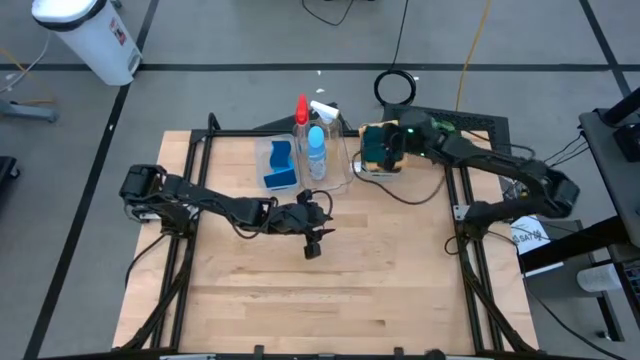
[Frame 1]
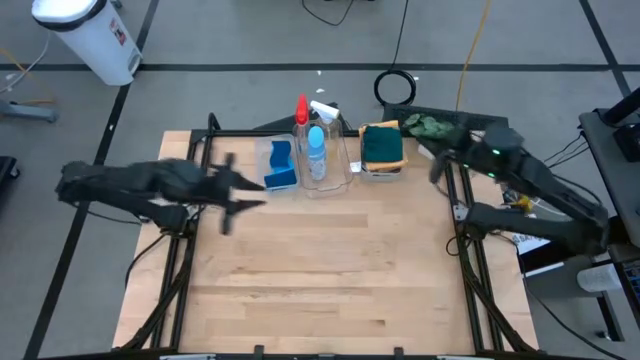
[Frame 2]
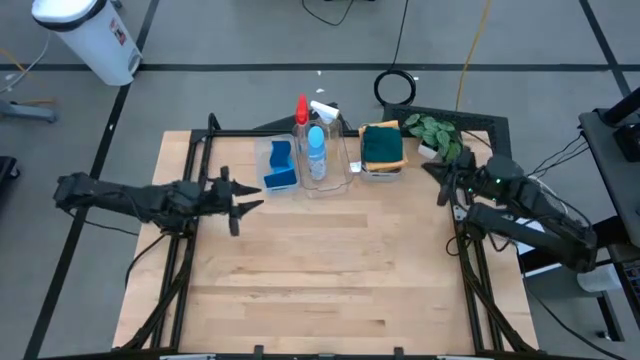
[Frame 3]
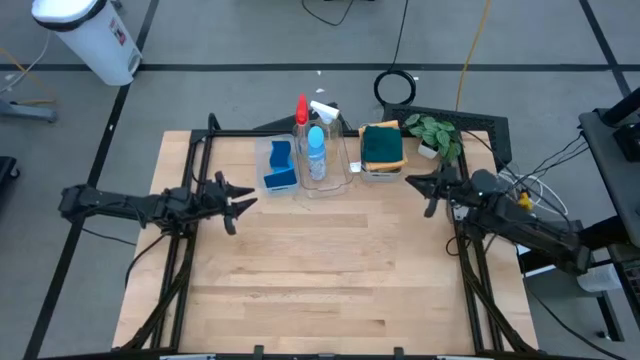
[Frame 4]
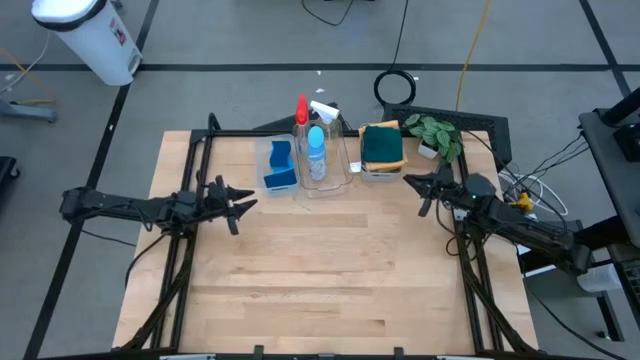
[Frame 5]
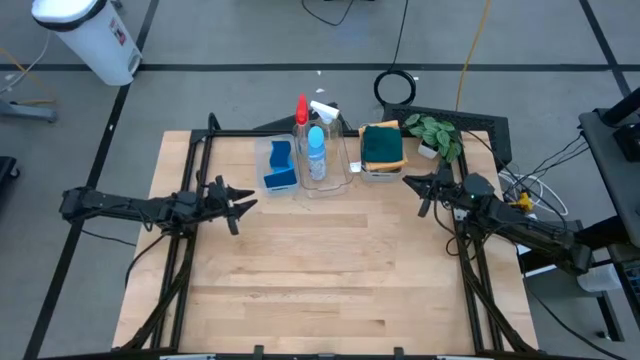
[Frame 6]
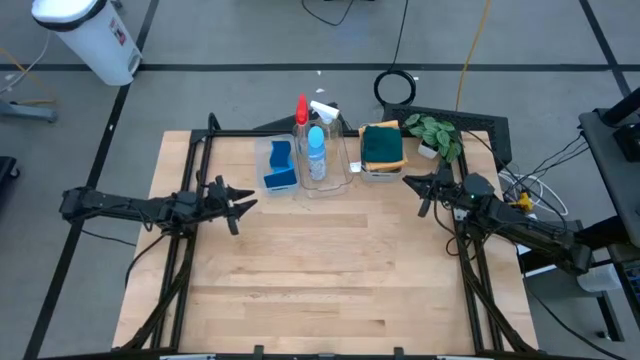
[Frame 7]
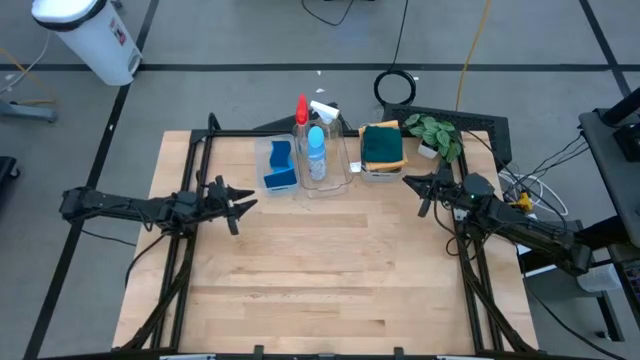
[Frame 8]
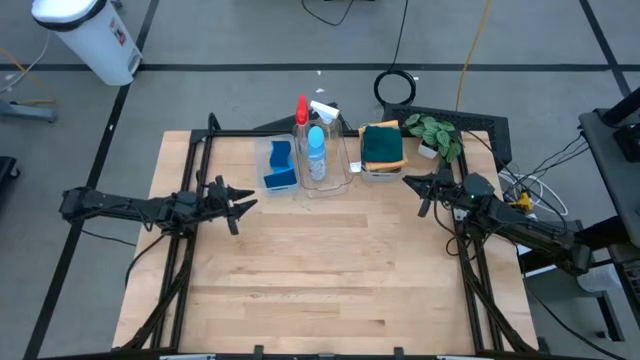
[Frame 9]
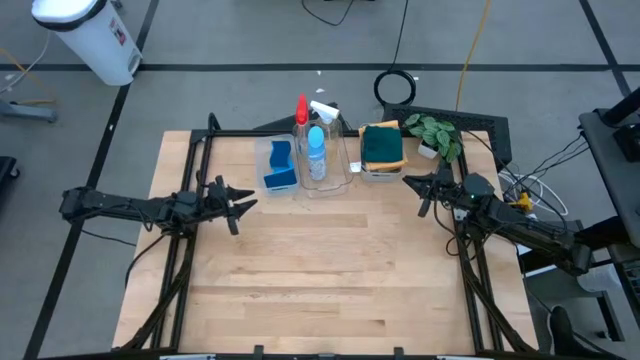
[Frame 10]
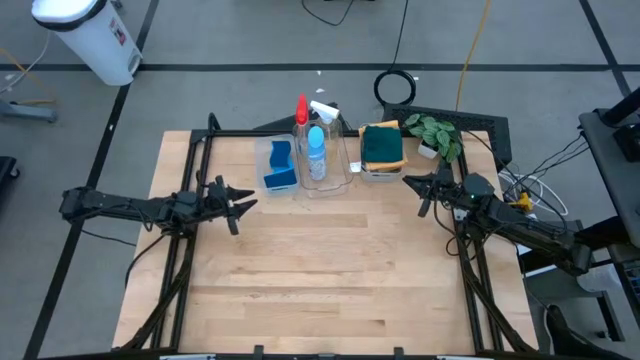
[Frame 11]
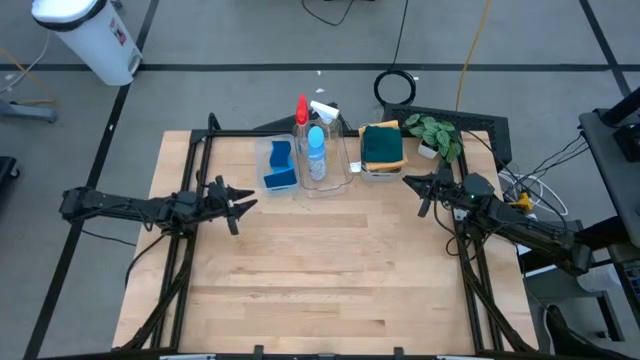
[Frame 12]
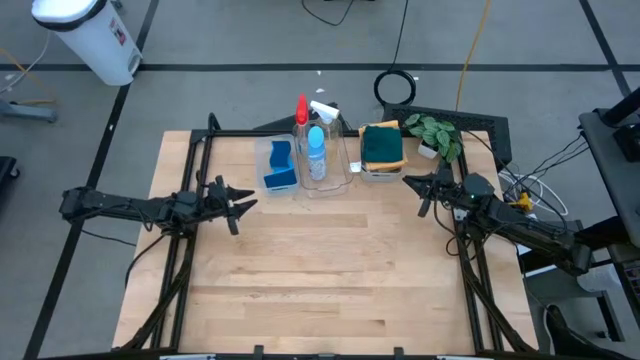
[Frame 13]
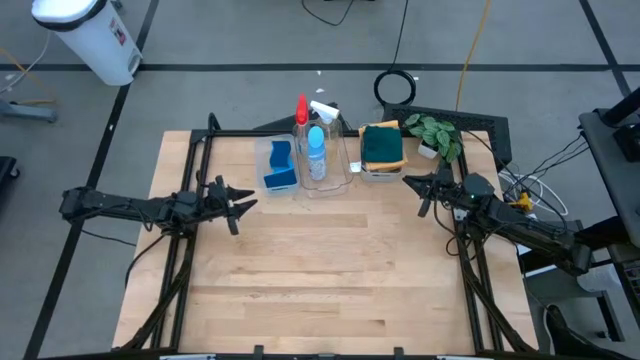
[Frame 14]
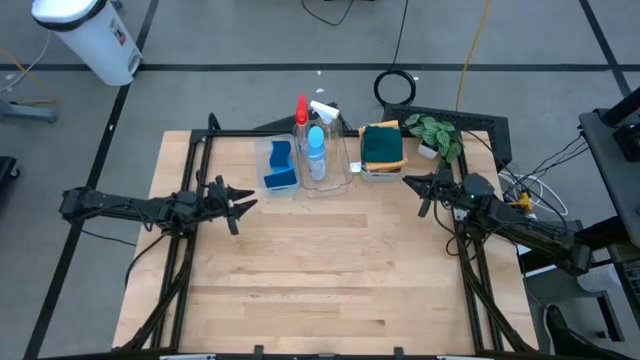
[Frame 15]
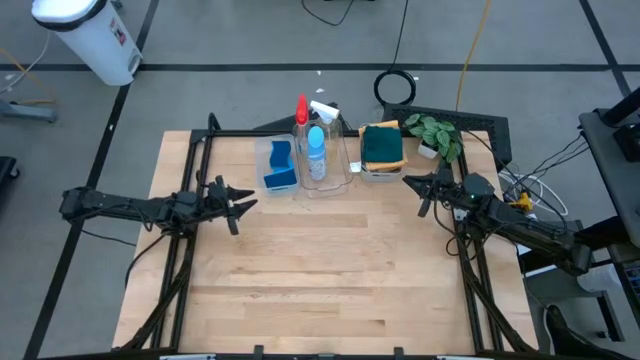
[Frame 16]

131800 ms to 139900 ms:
Task: Pick & Place Kitchen Items
Return to Home Position

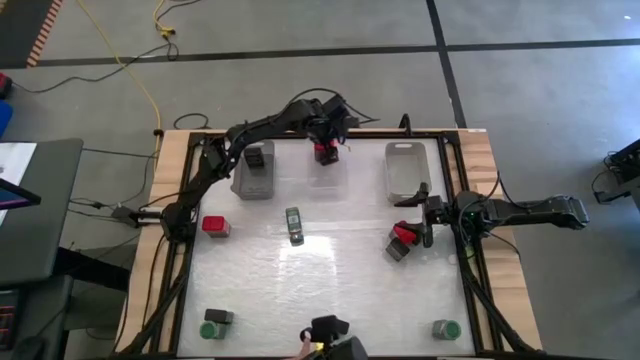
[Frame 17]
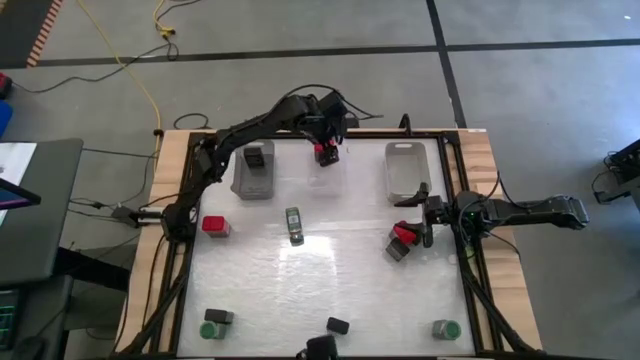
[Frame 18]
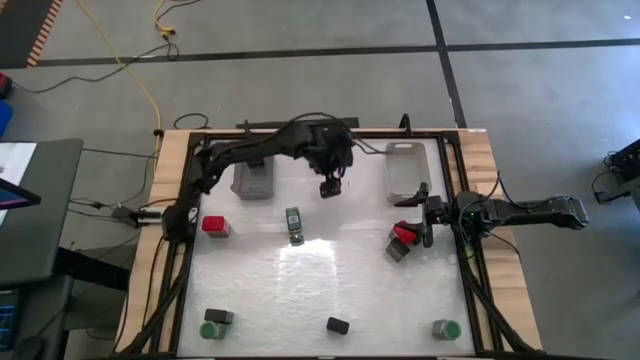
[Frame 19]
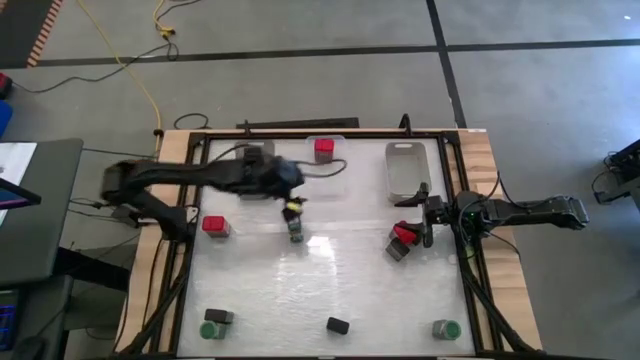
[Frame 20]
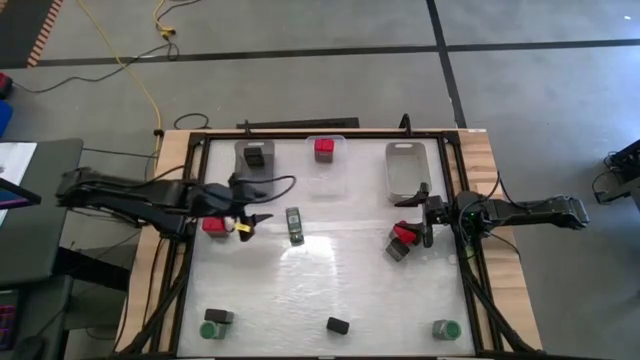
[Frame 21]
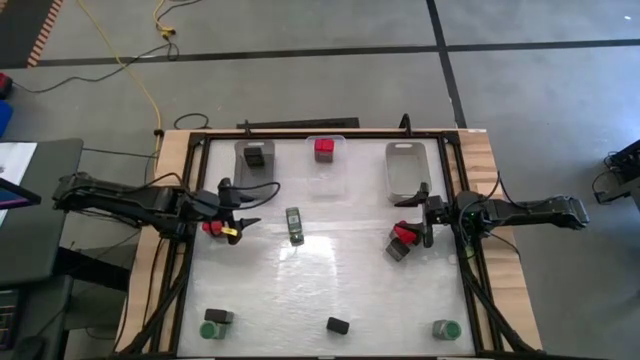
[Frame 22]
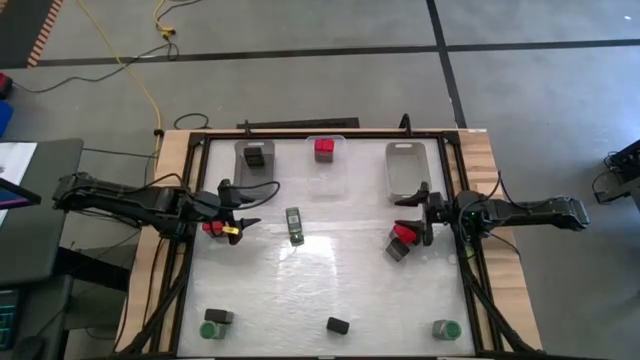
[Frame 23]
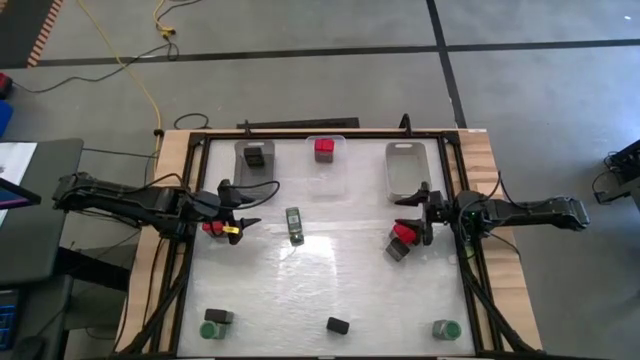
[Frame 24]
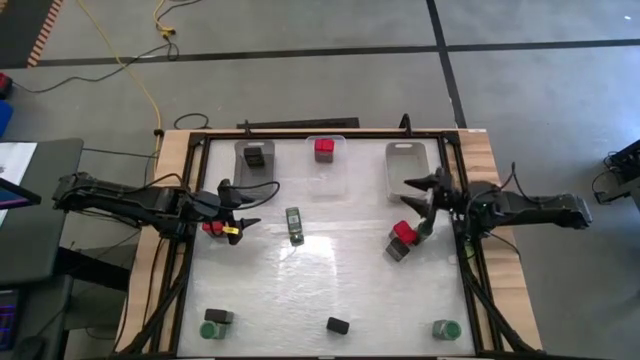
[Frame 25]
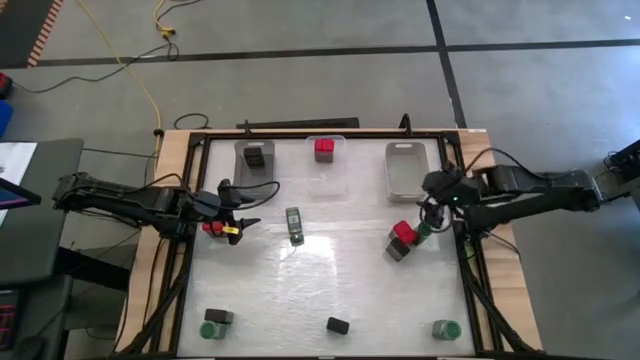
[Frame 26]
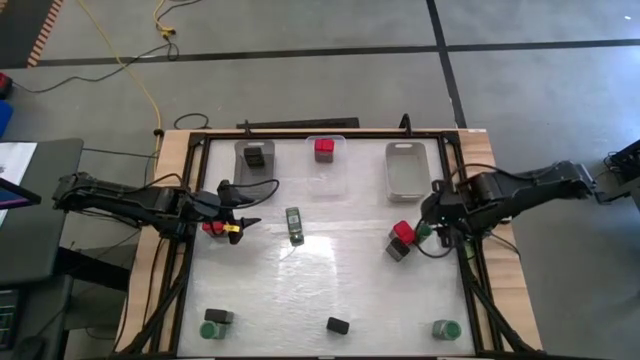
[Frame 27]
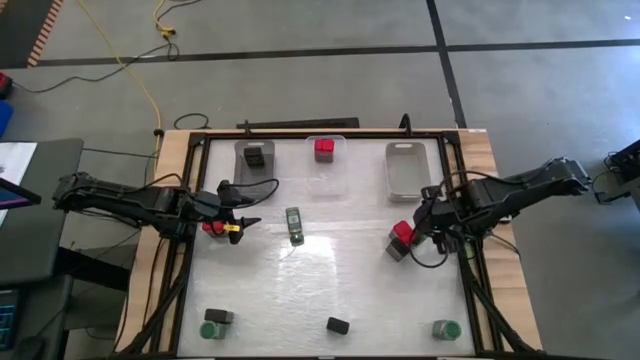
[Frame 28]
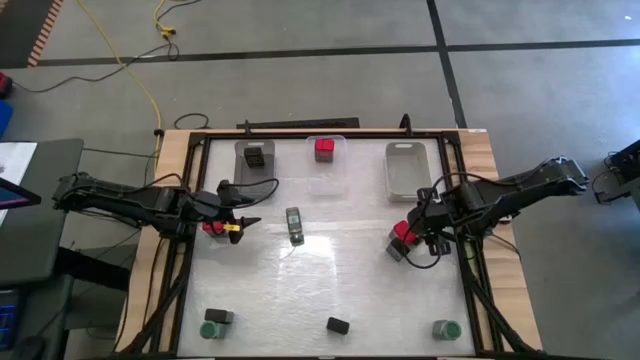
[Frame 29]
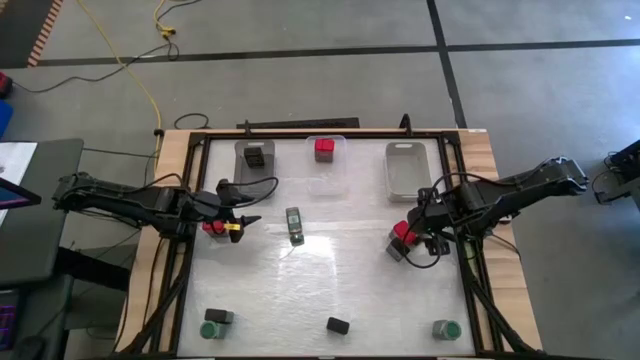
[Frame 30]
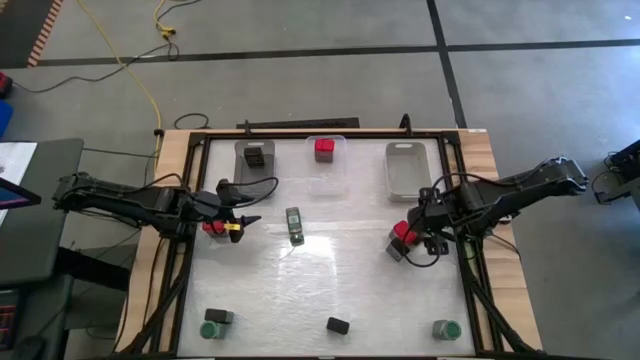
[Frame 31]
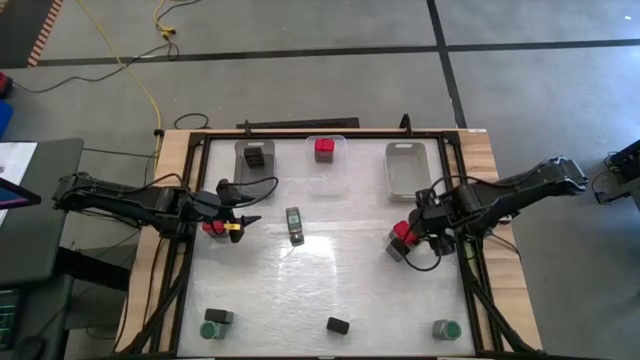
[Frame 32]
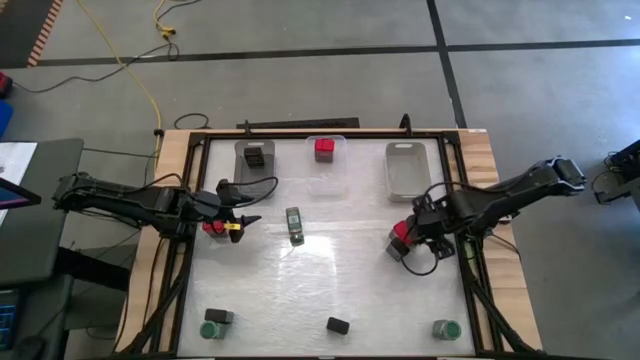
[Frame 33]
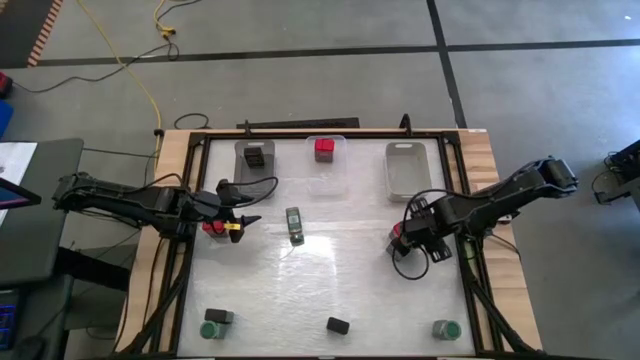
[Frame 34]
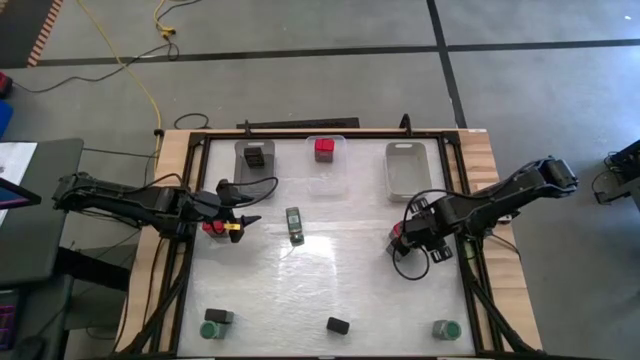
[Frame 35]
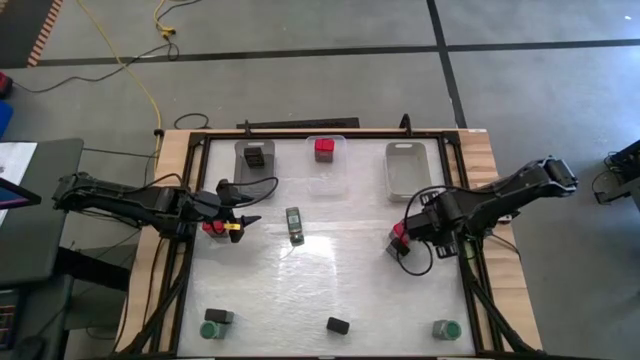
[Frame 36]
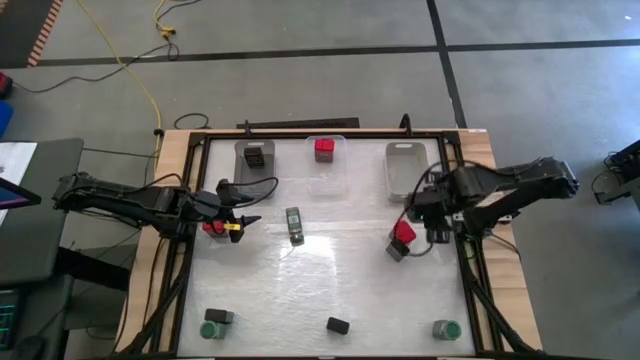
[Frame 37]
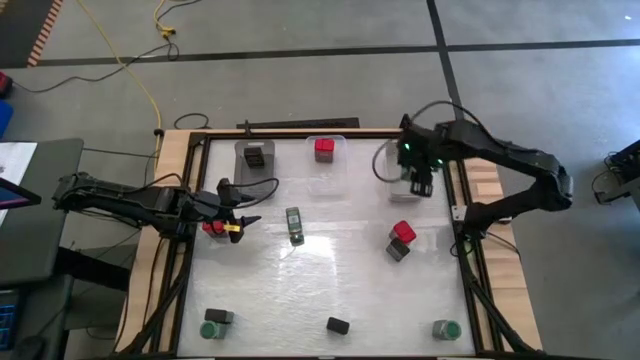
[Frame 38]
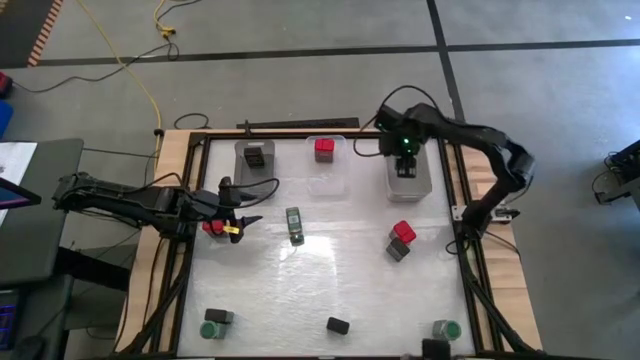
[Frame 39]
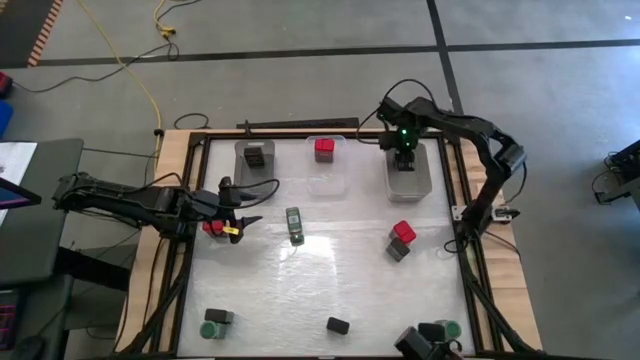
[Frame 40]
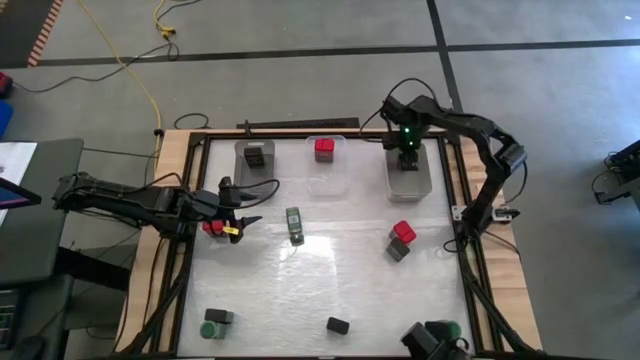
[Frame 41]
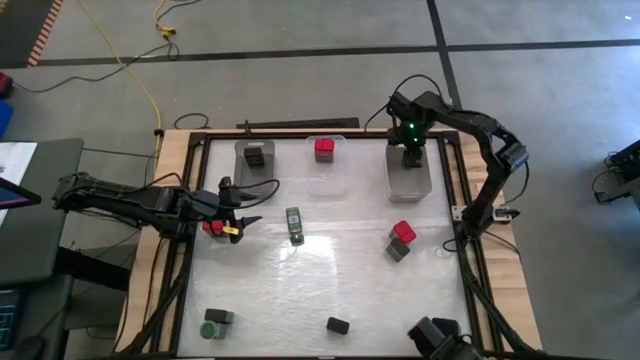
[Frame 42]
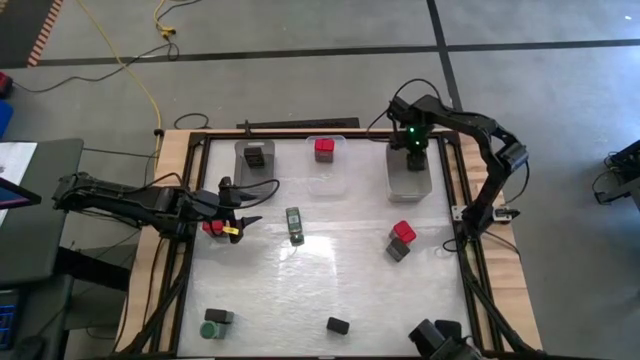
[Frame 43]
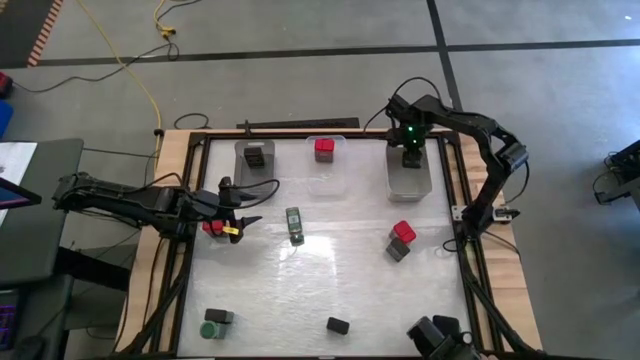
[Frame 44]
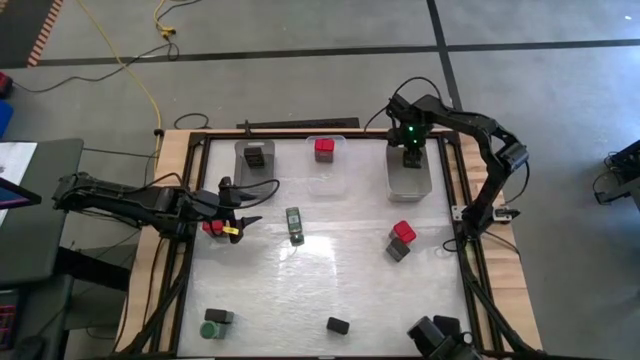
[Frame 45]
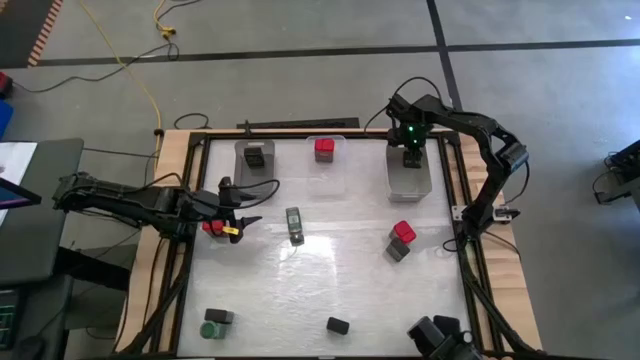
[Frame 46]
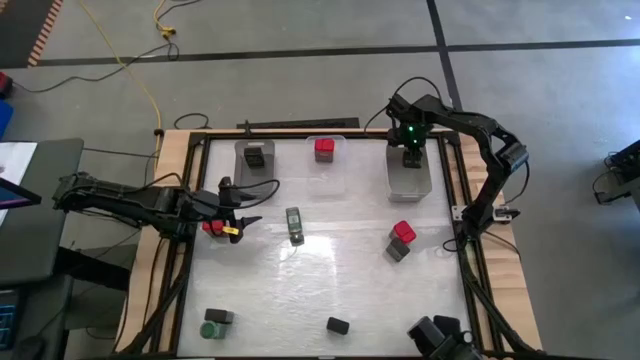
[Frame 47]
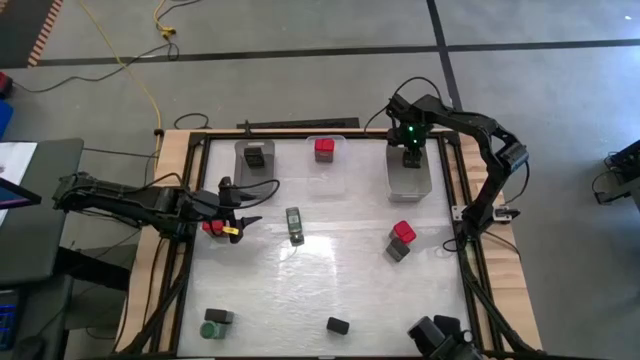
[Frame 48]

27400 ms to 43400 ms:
Task: Sort spices by type
Put the green seasoning bottle into the gray bin
